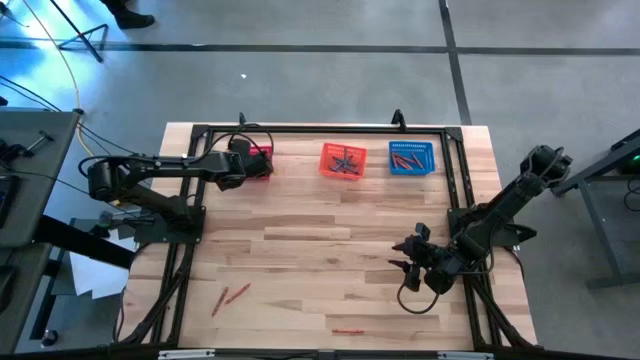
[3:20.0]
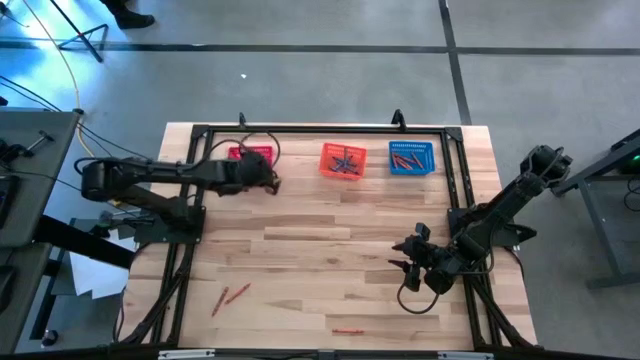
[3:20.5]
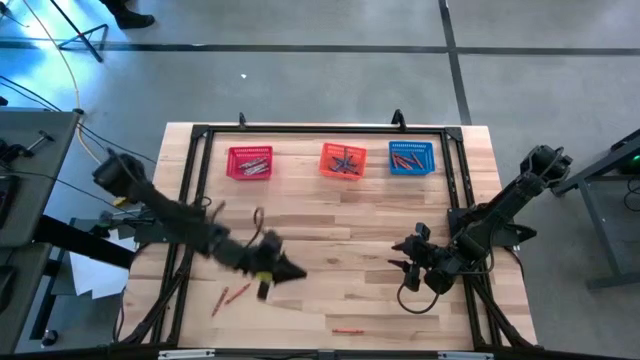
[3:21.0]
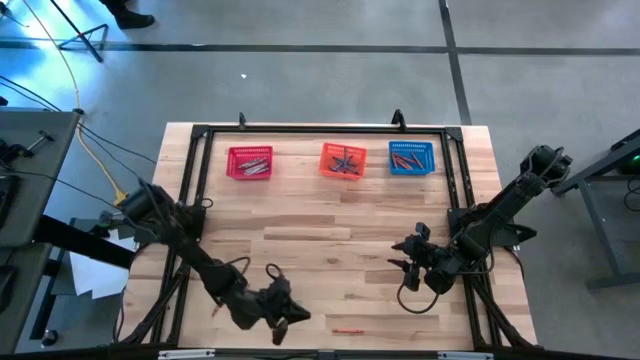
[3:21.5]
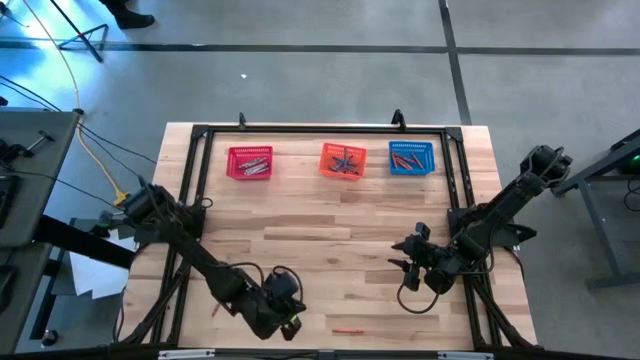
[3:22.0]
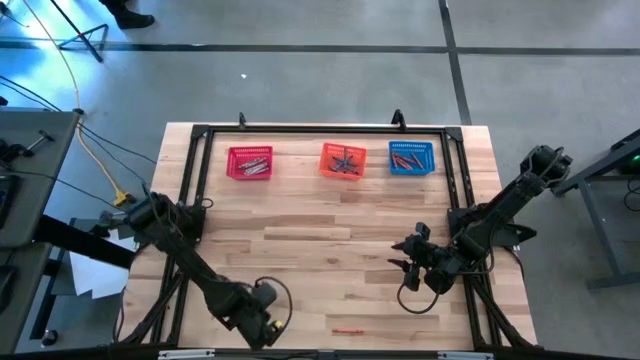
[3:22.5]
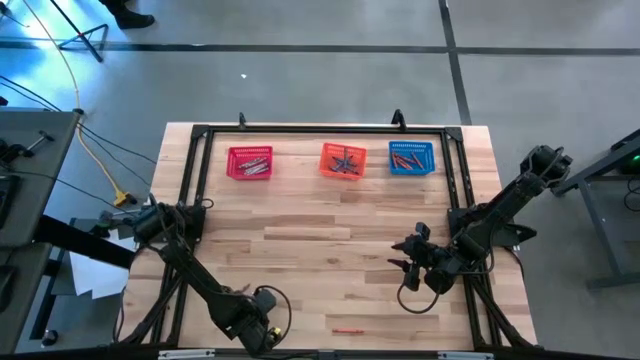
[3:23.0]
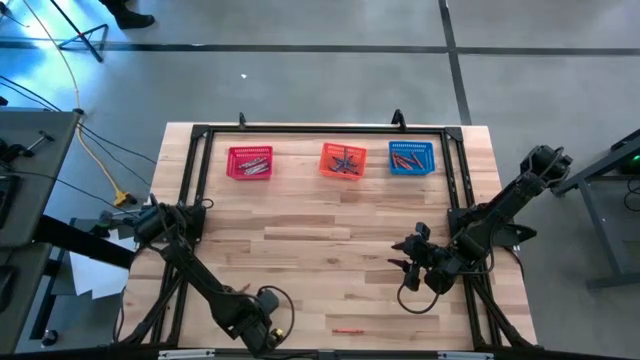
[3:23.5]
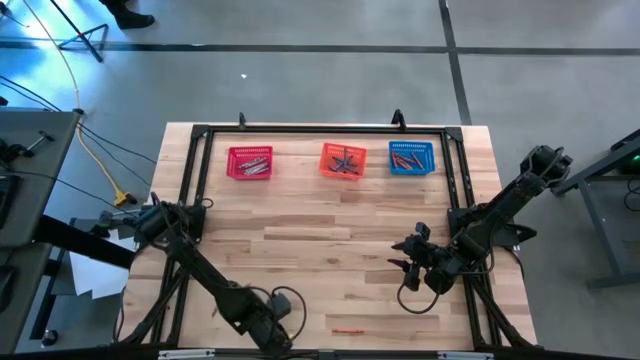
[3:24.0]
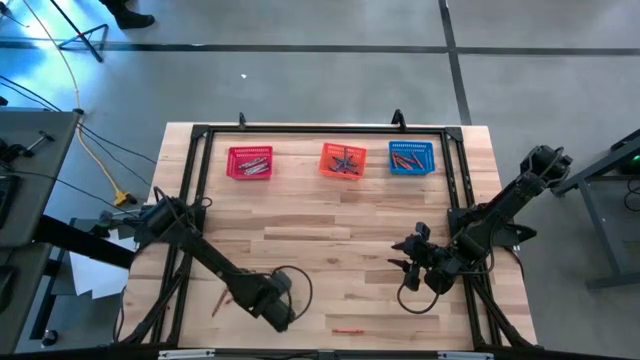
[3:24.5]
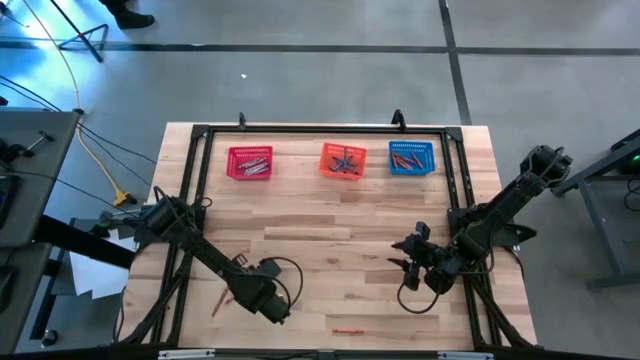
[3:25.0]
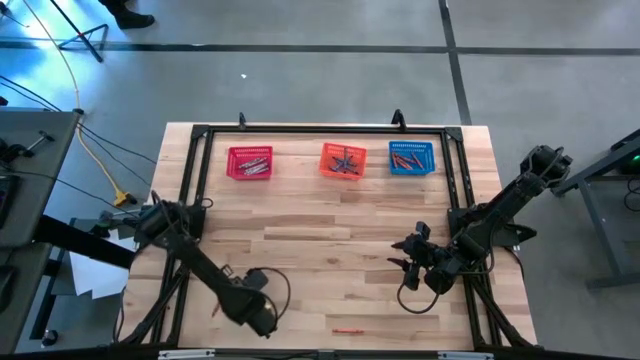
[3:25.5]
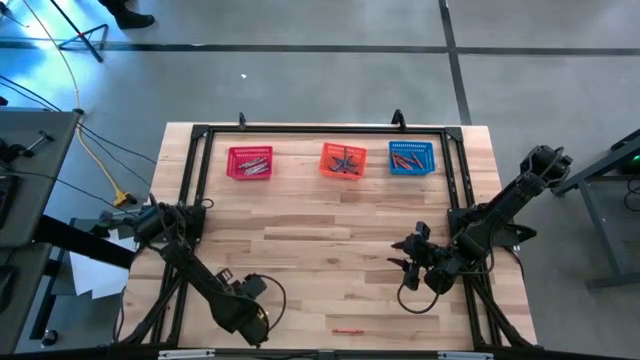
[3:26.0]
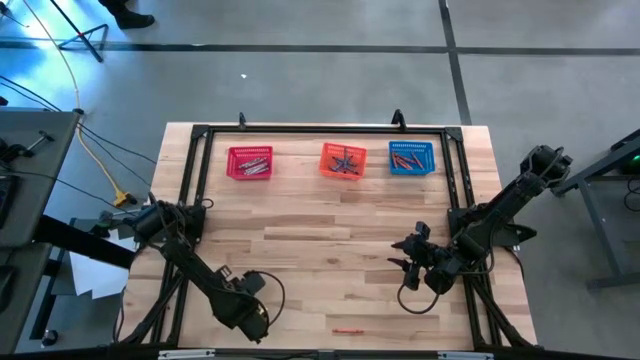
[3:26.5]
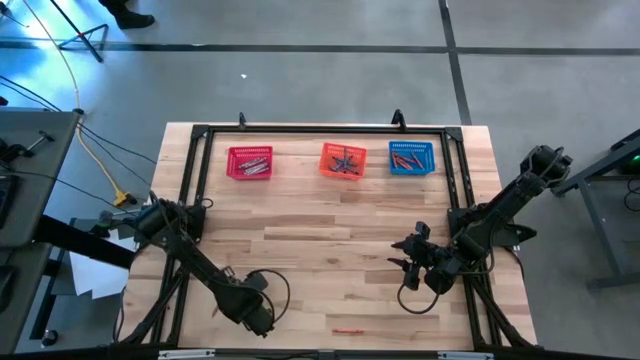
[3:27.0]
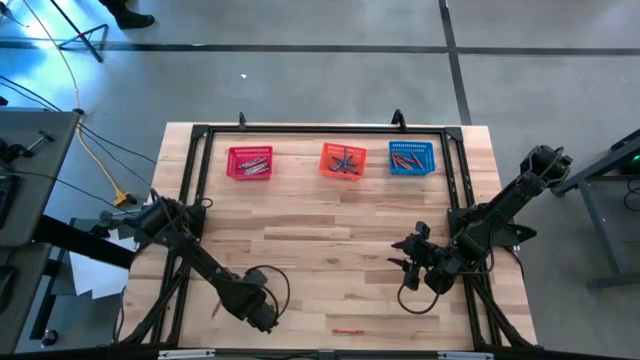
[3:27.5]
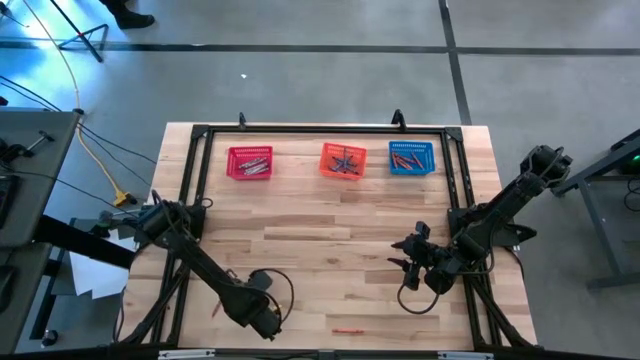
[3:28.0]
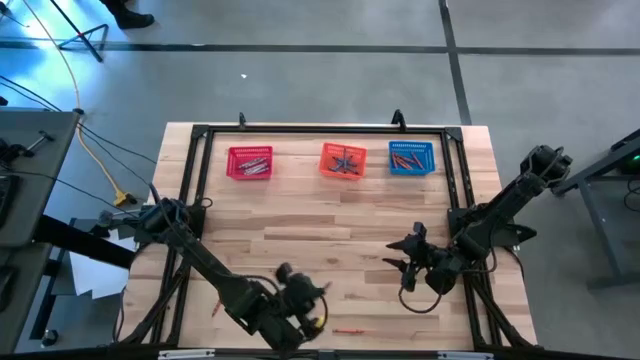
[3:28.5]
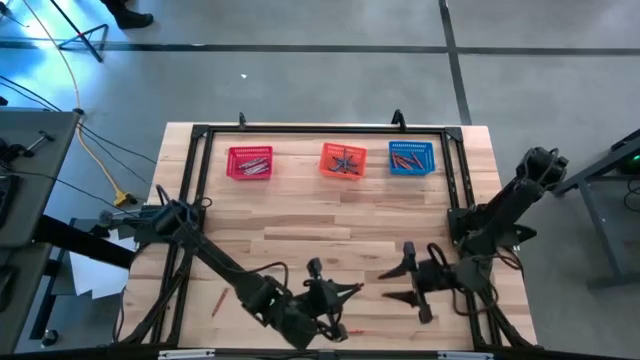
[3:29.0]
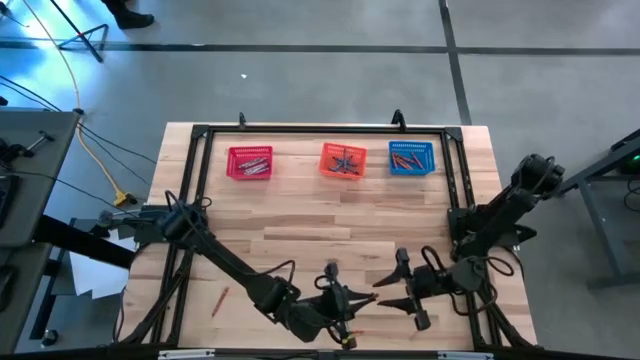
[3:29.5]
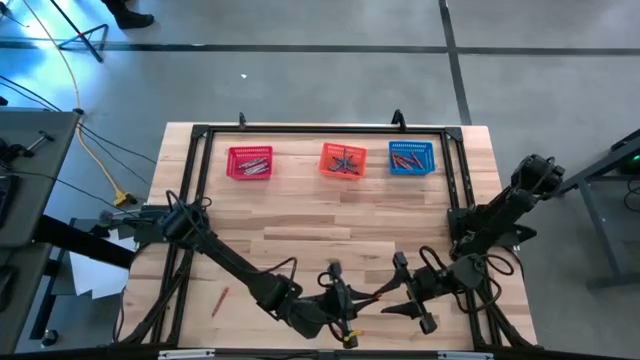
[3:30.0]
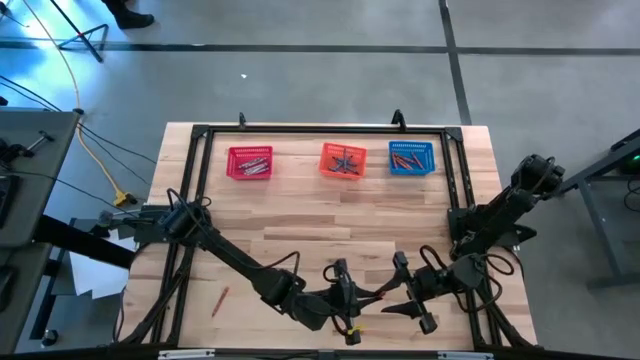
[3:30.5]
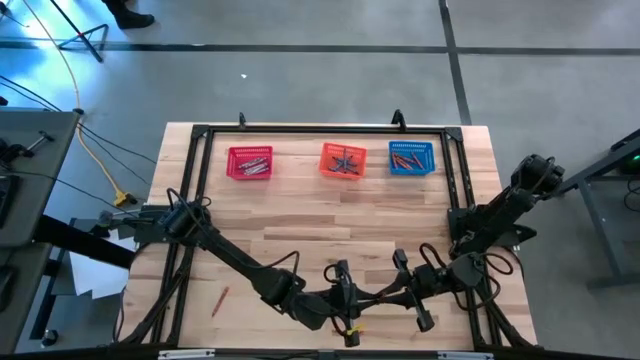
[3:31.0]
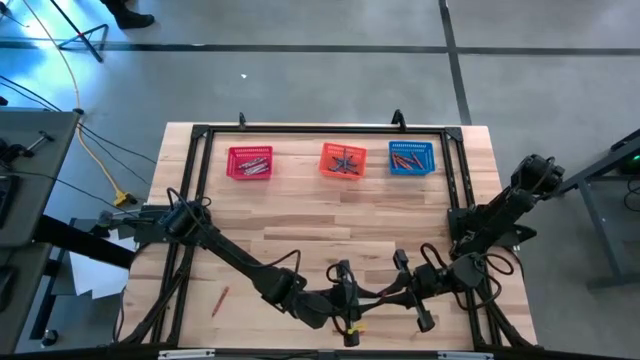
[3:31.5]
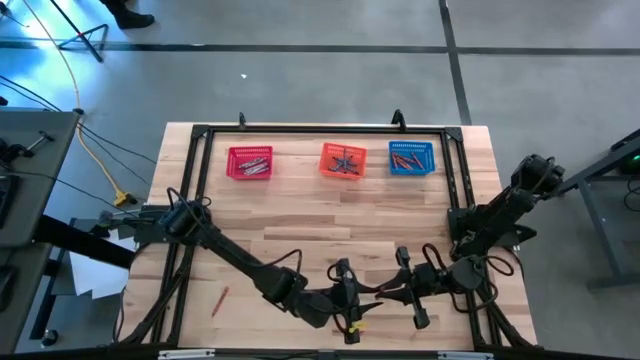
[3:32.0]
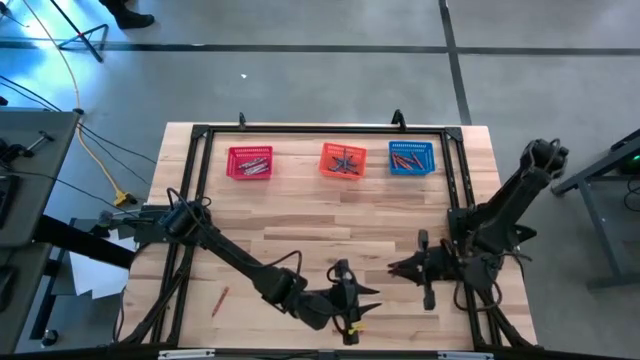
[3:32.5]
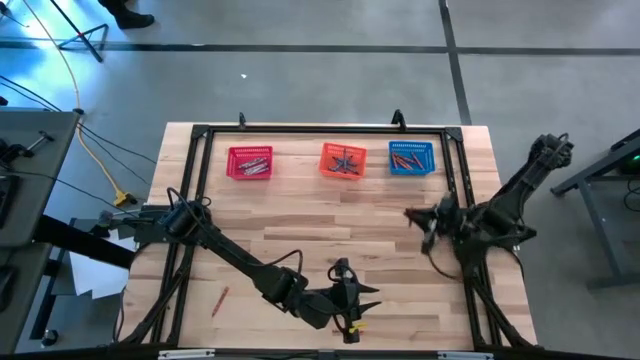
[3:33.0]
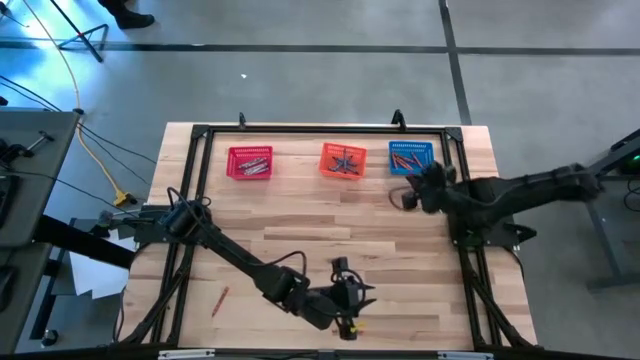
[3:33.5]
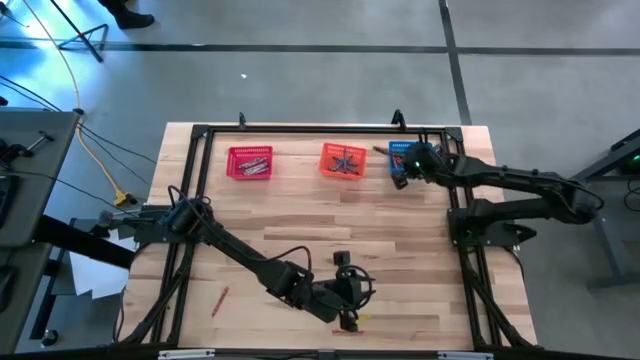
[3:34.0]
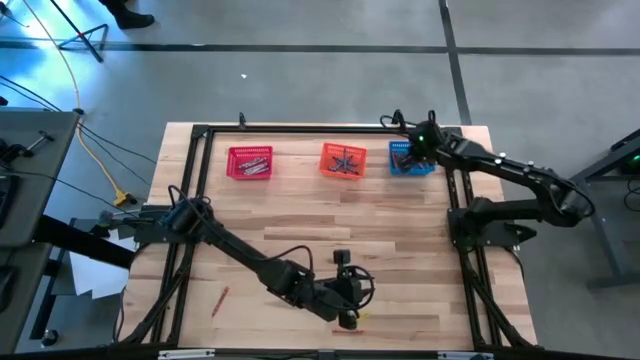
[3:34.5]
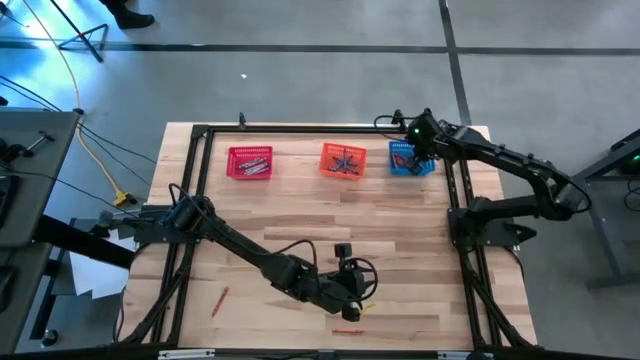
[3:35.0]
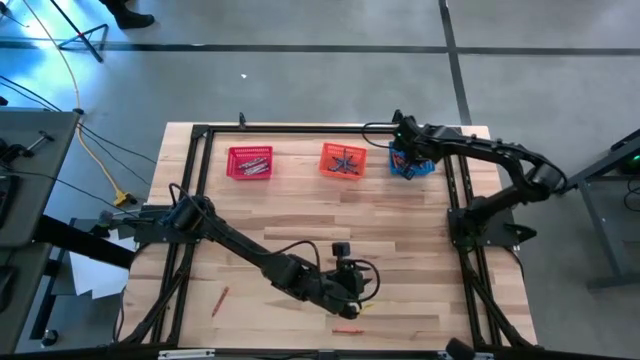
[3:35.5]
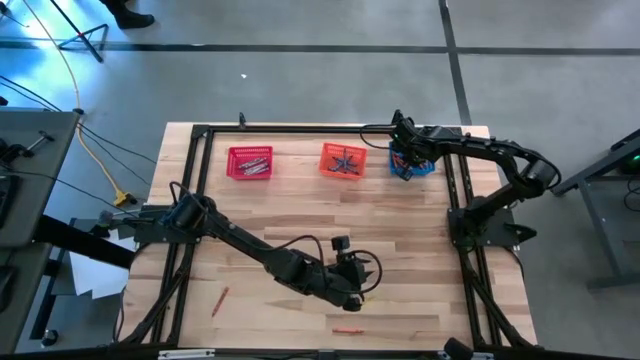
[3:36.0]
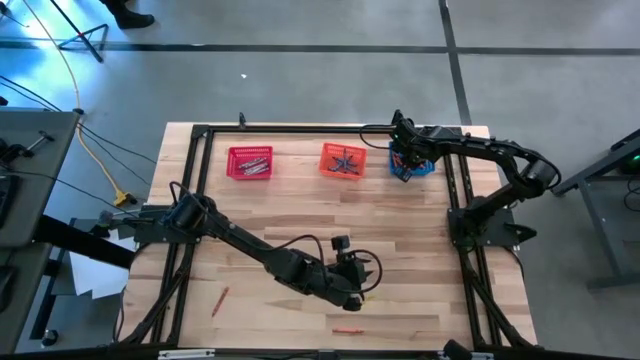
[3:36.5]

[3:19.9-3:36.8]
Task: Sort crayons
Put the orange crayon into the blue bin

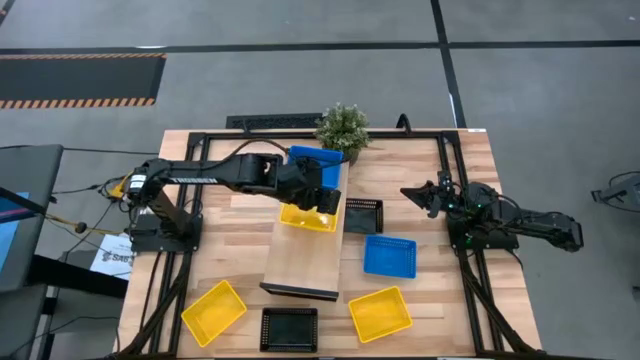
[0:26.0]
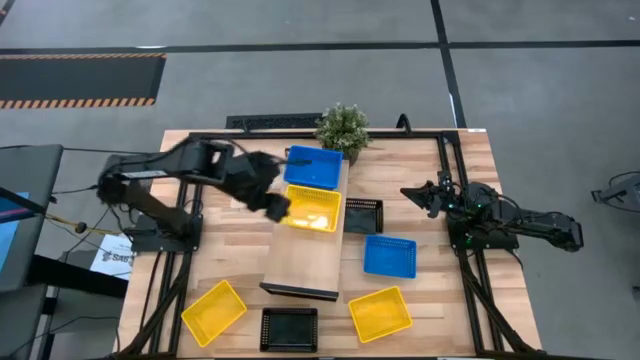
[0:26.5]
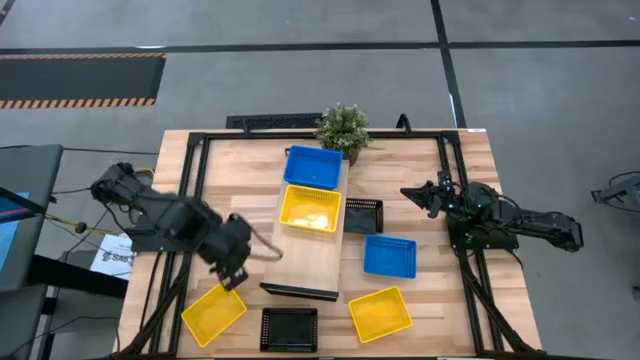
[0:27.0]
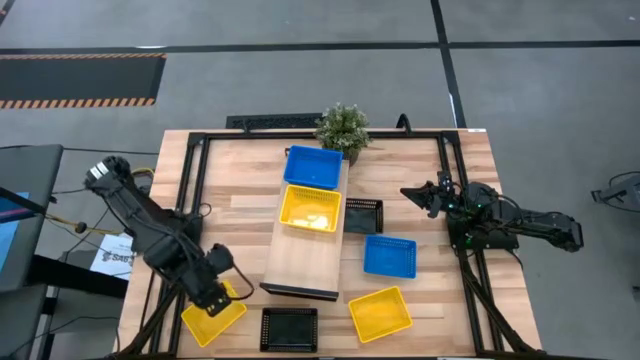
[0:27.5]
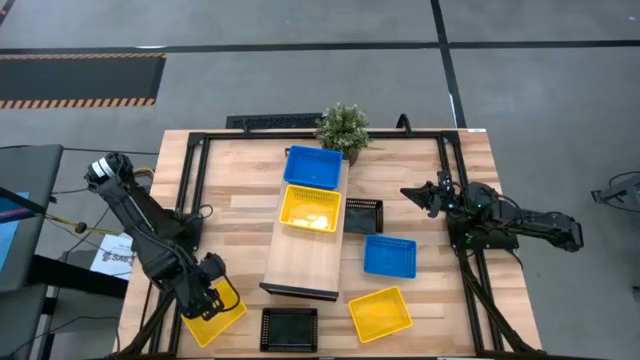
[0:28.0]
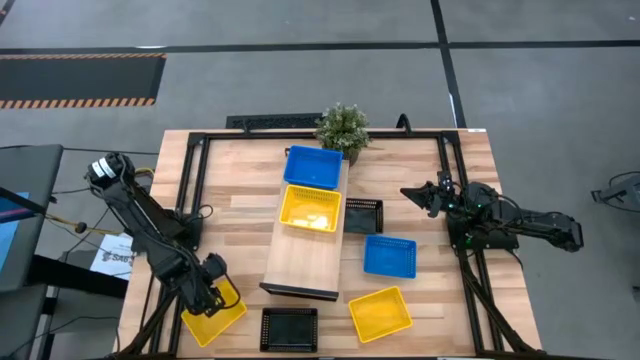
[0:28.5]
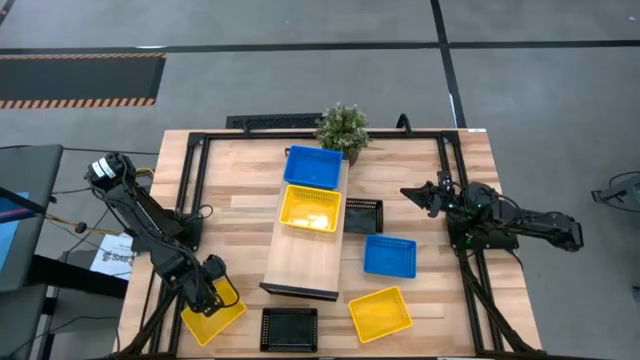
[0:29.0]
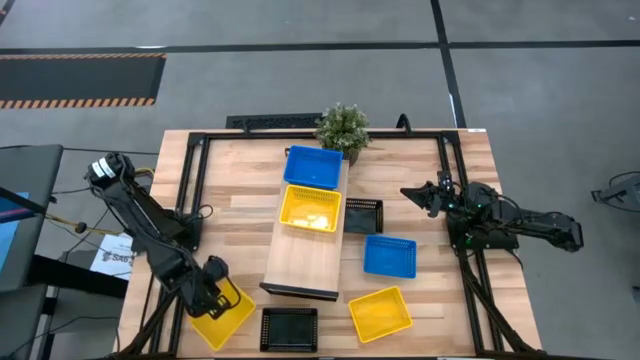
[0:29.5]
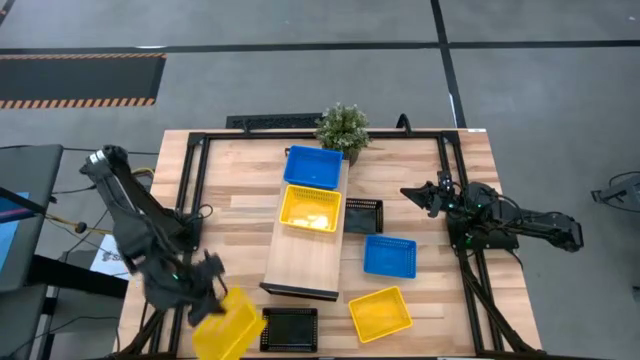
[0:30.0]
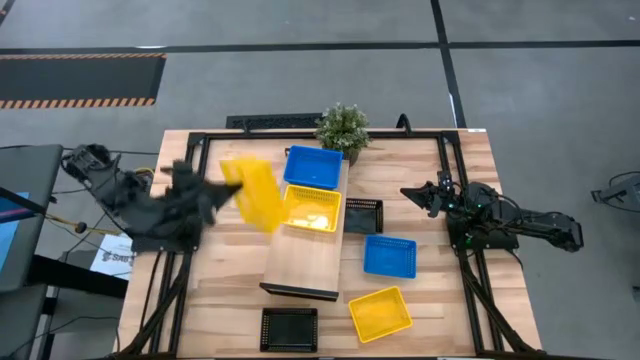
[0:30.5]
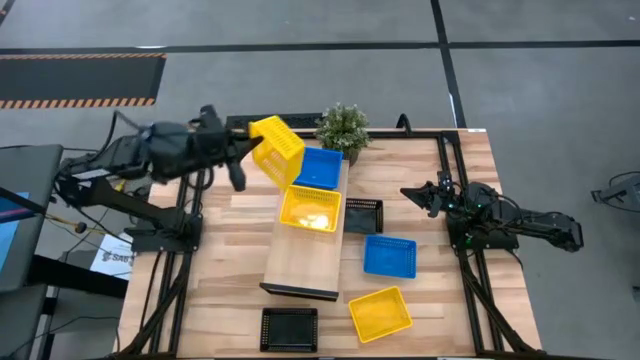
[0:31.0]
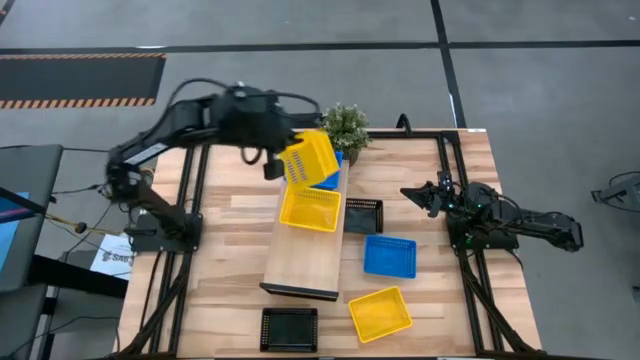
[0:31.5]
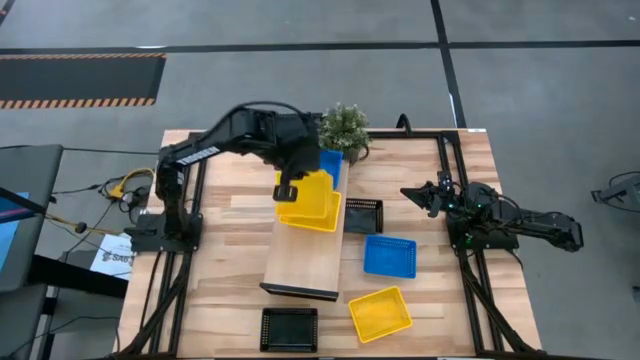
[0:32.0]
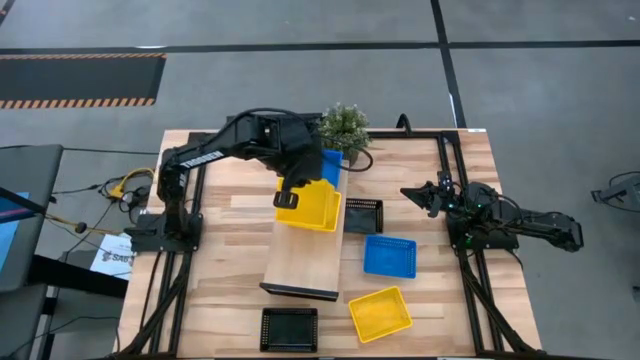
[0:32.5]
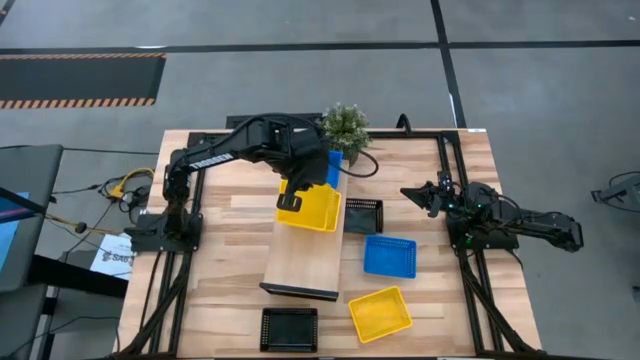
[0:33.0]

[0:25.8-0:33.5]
Task: Stack baskets on shelf by color
Stack the left yellow basket on top of the yellow basket on the shelf
